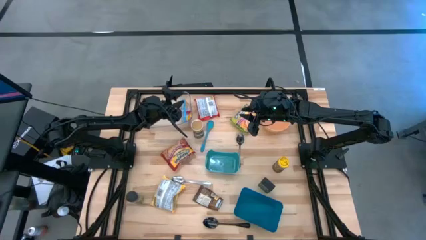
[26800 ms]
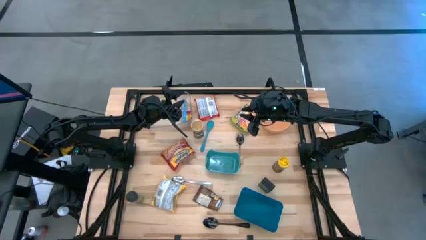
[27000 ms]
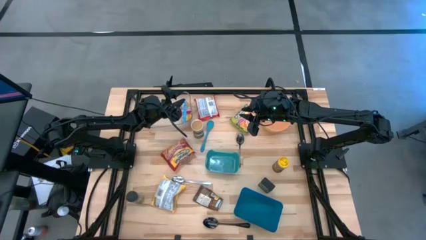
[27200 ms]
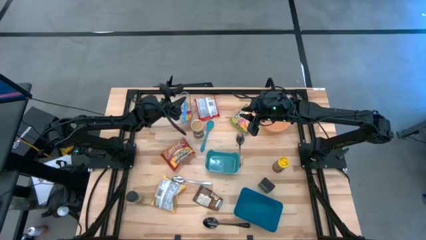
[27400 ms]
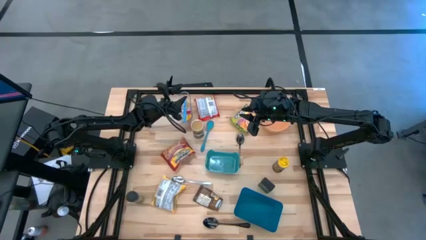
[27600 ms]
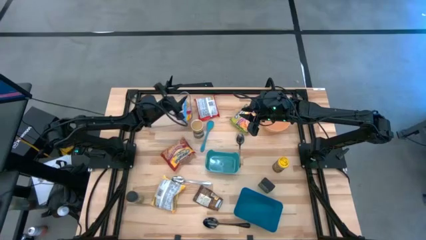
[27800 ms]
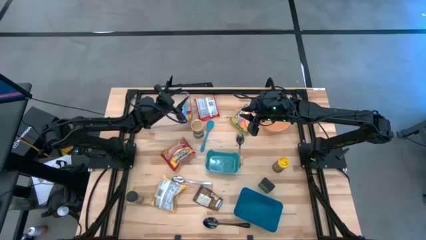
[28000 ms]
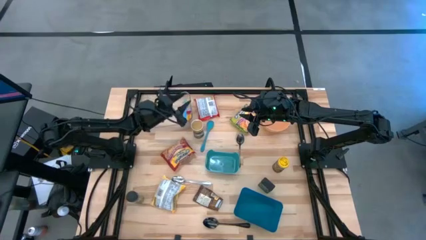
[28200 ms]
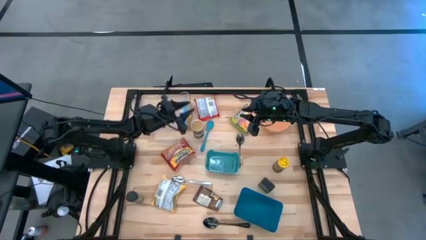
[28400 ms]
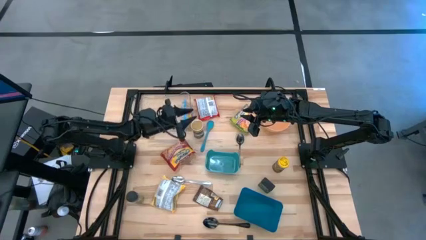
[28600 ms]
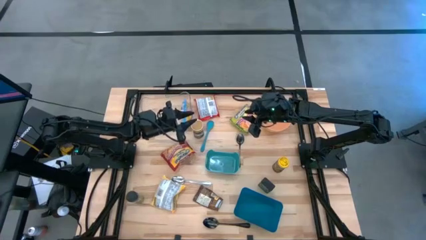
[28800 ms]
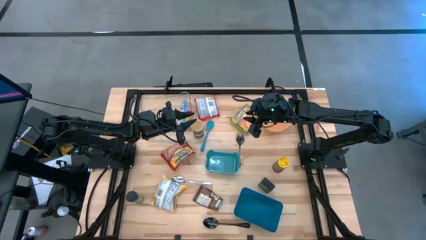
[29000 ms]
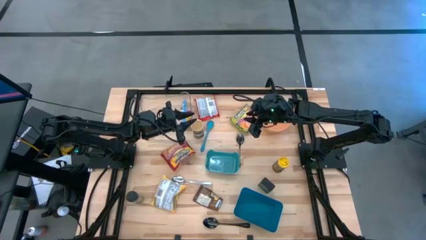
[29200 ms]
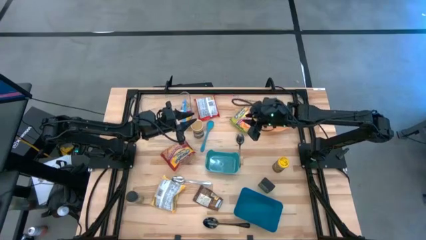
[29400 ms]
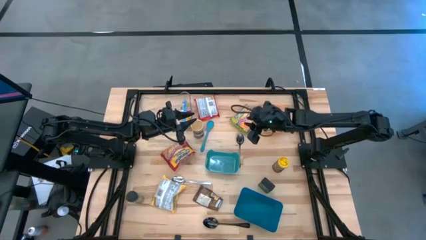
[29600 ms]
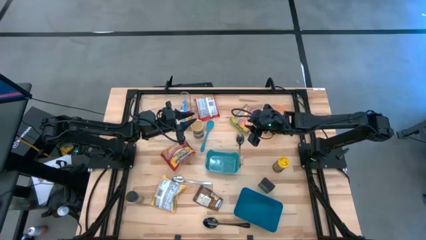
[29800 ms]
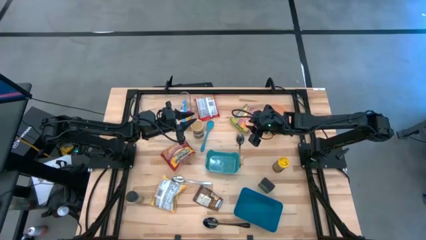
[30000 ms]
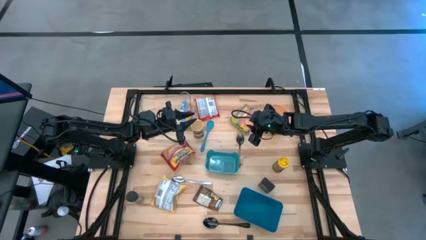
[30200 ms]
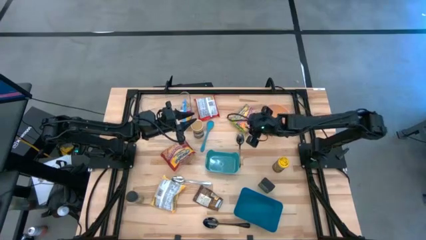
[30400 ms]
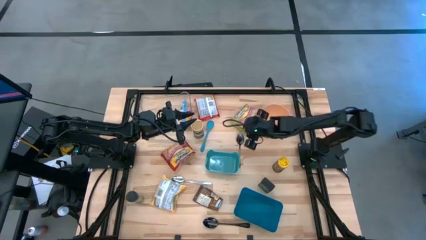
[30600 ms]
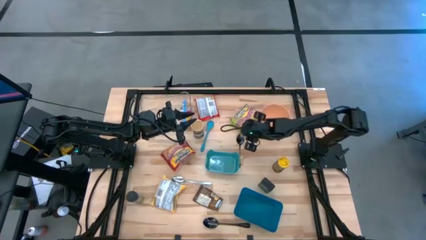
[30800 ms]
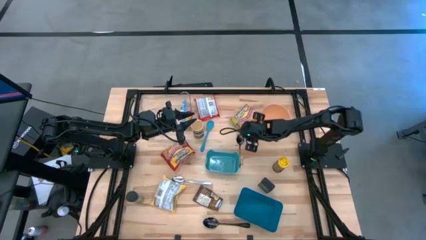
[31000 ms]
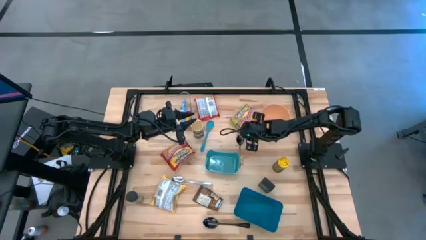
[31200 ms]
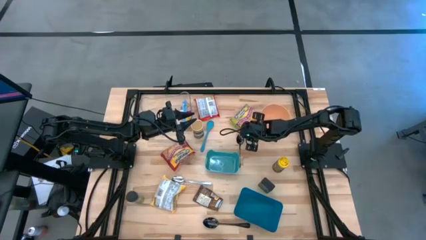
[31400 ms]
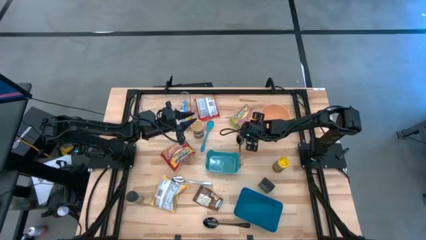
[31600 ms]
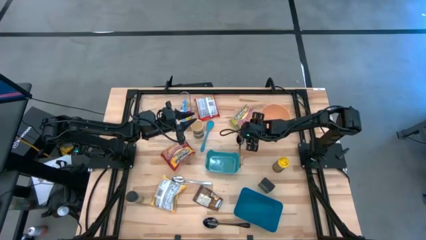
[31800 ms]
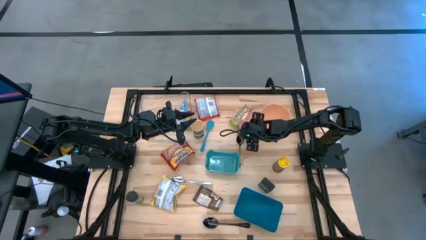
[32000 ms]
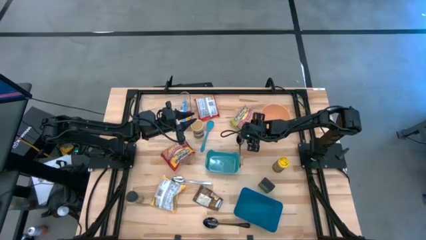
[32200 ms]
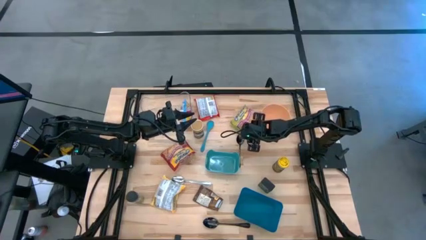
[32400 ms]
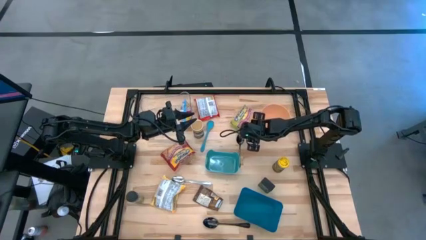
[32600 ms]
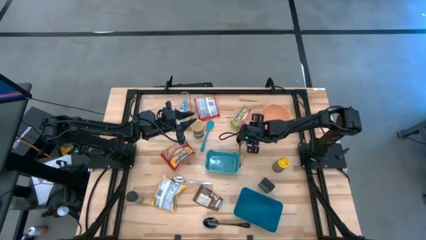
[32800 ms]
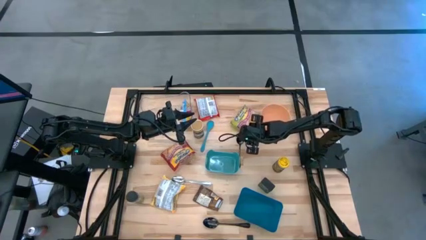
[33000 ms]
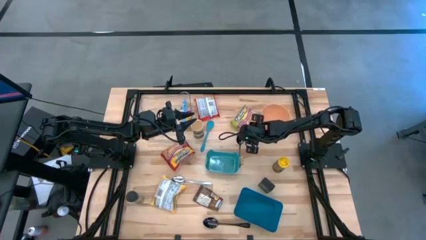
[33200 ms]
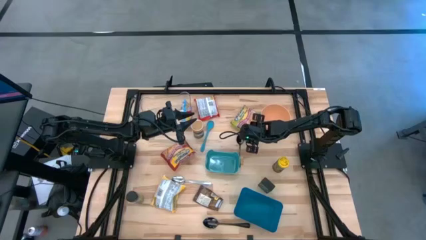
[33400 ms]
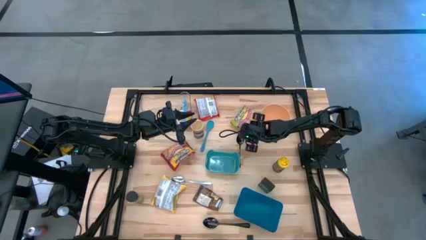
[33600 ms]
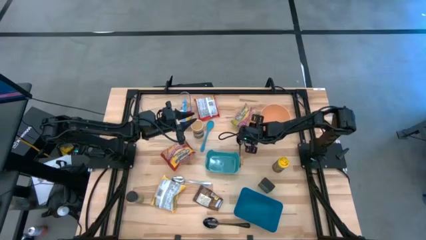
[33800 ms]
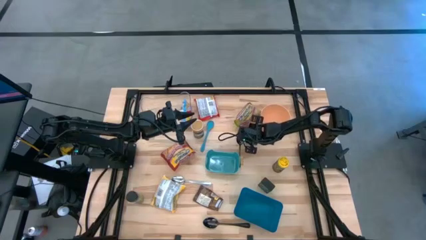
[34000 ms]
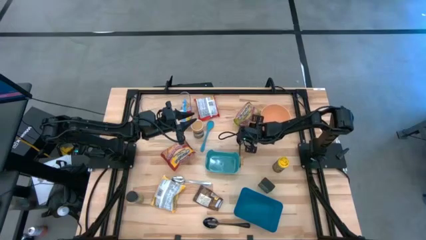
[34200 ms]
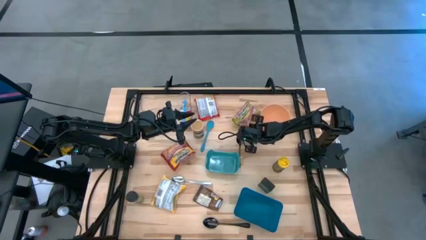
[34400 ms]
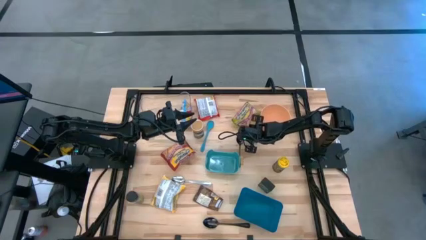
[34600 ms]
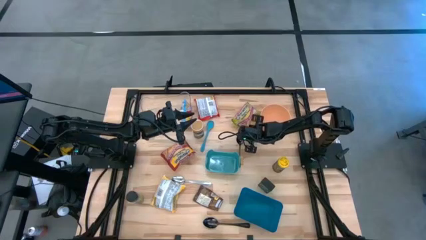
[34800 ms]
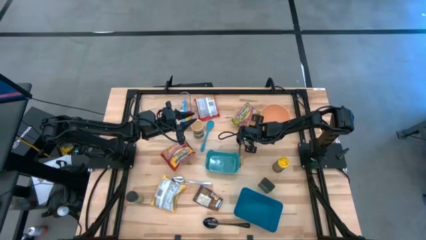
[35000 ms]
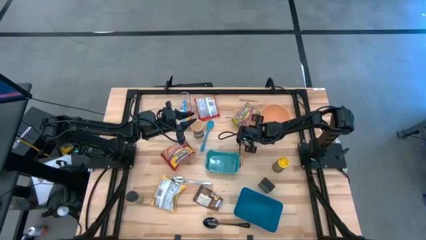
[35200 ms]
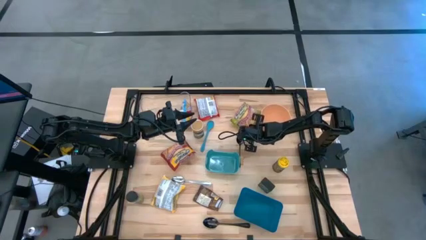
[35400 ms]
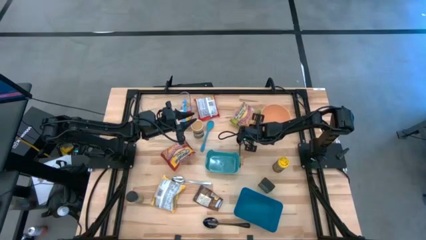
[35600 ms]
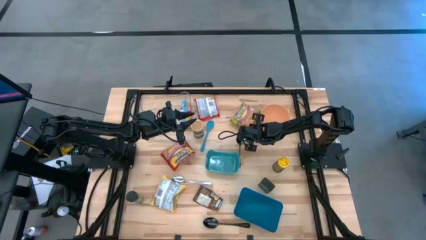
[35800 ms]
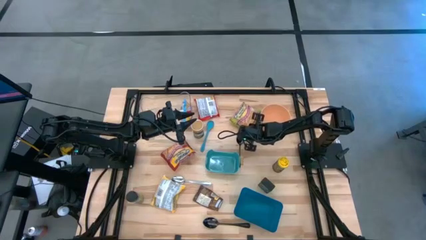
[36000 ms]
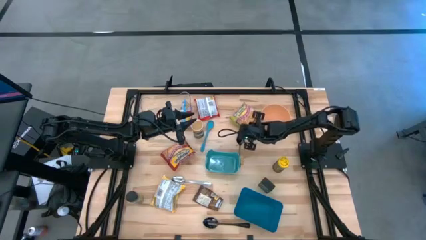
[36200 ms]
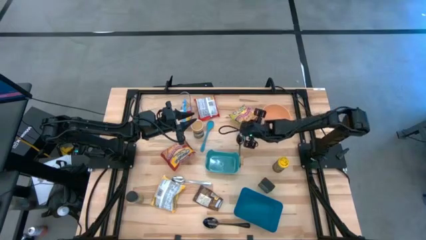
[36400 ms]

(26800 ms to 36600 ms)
Task: Pick & Place Food Item
Put the green noodle pack into the transparent bin

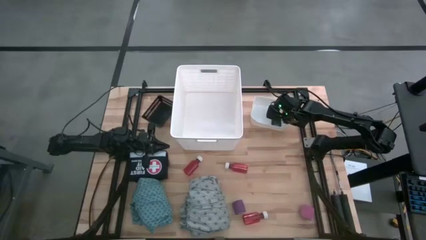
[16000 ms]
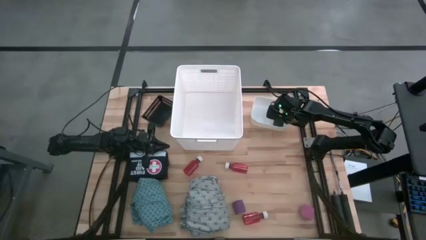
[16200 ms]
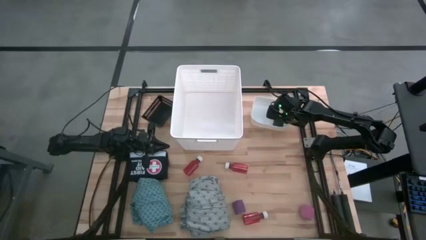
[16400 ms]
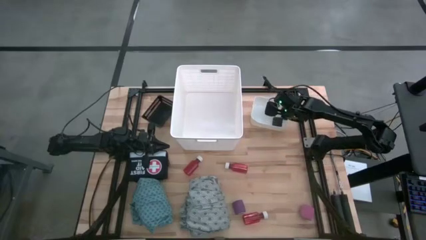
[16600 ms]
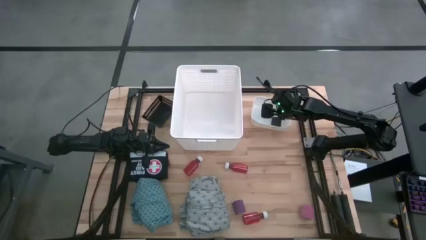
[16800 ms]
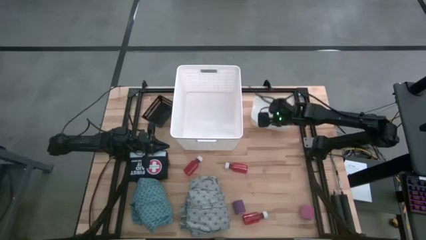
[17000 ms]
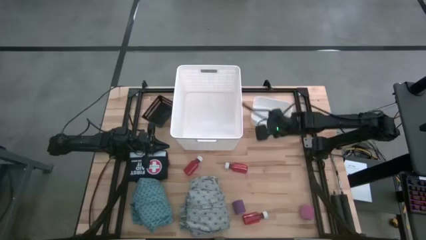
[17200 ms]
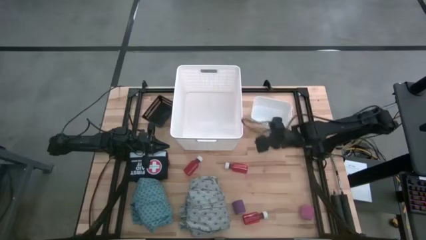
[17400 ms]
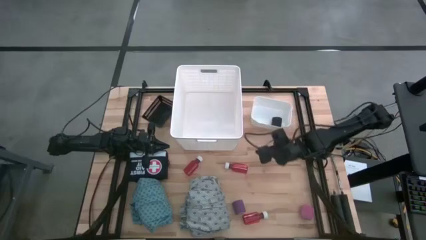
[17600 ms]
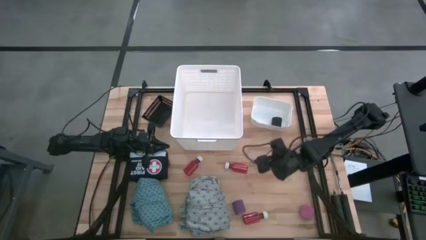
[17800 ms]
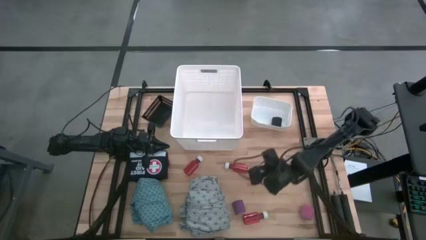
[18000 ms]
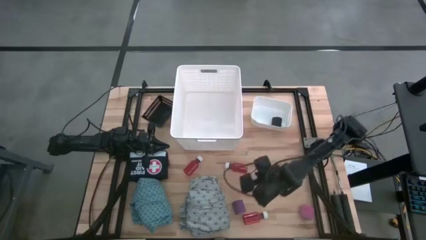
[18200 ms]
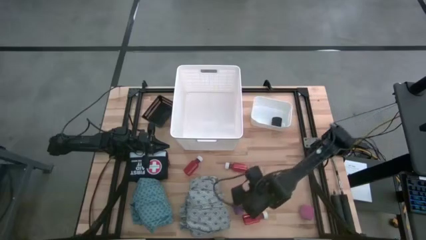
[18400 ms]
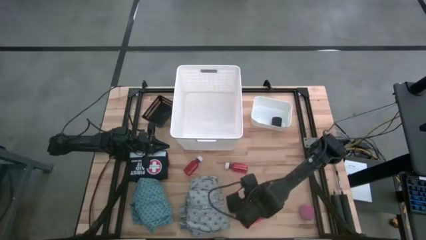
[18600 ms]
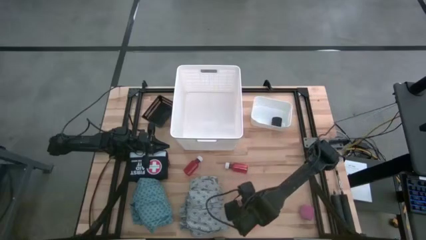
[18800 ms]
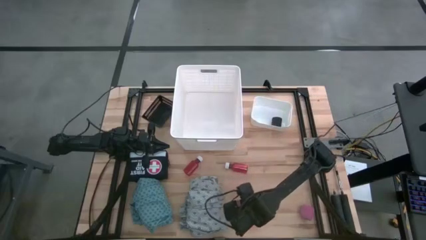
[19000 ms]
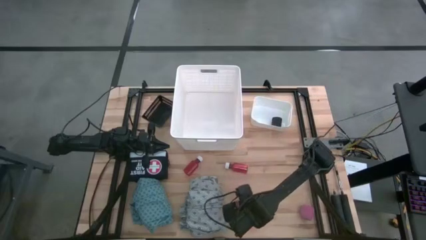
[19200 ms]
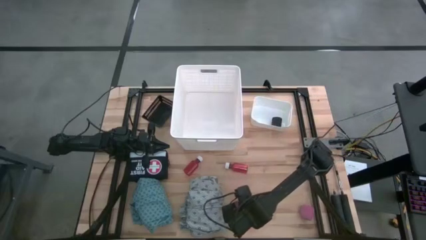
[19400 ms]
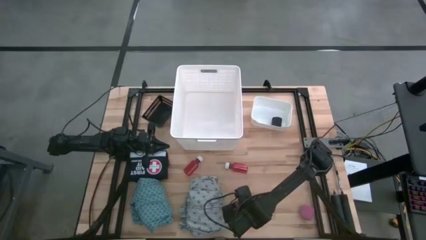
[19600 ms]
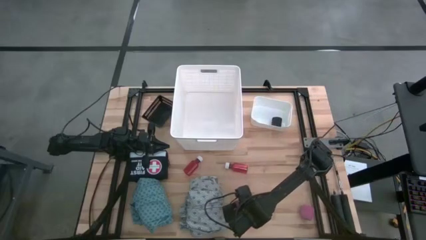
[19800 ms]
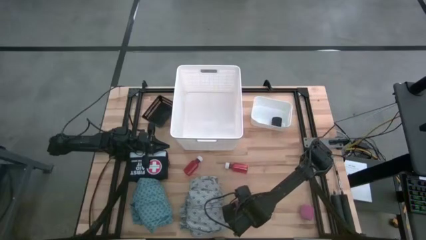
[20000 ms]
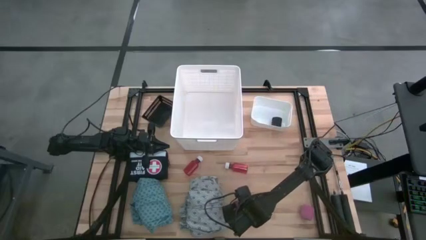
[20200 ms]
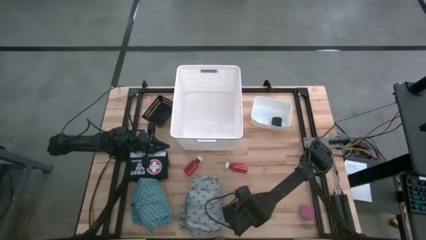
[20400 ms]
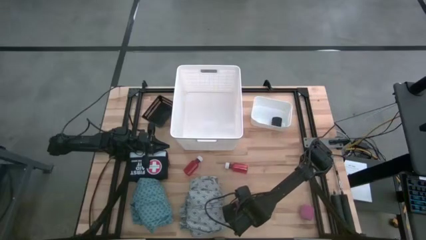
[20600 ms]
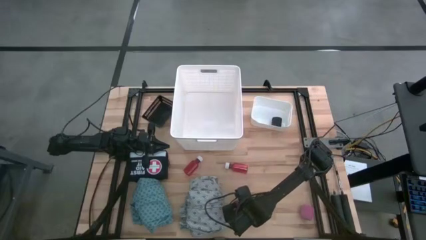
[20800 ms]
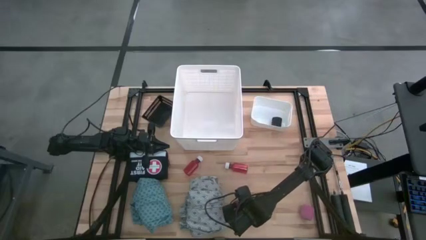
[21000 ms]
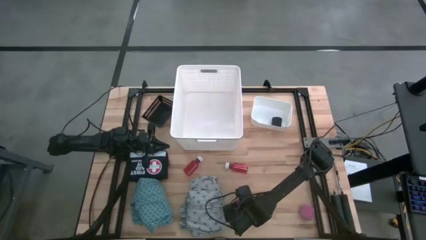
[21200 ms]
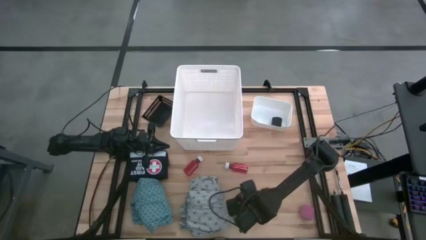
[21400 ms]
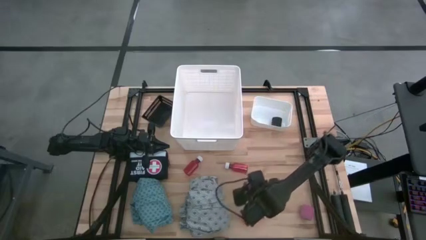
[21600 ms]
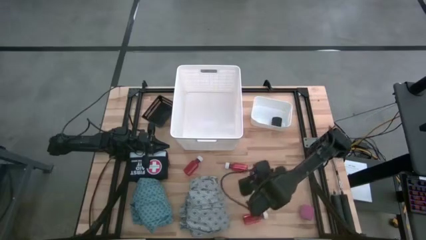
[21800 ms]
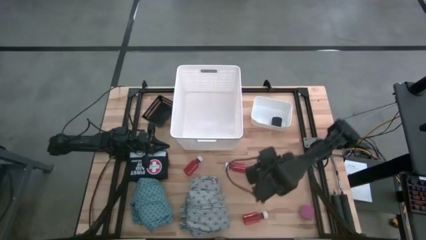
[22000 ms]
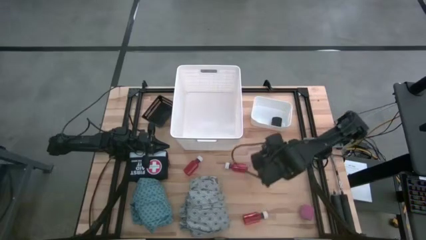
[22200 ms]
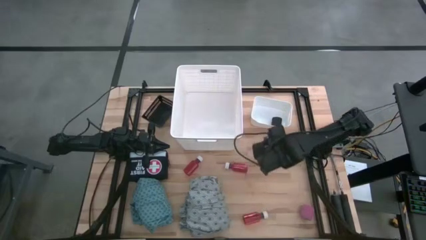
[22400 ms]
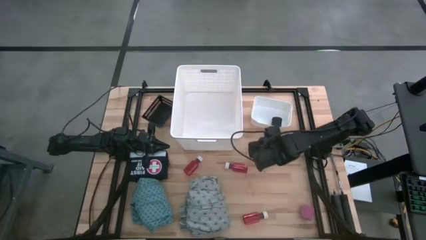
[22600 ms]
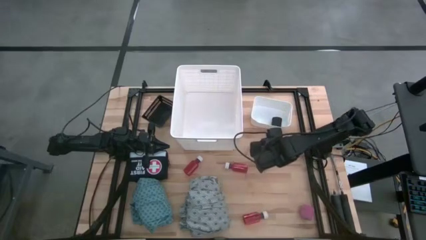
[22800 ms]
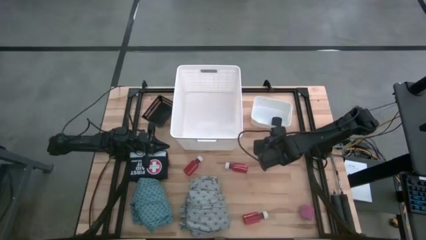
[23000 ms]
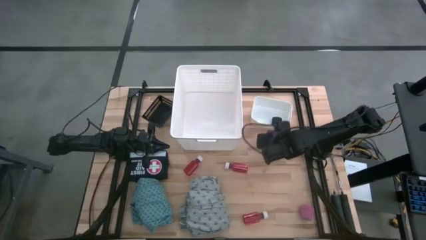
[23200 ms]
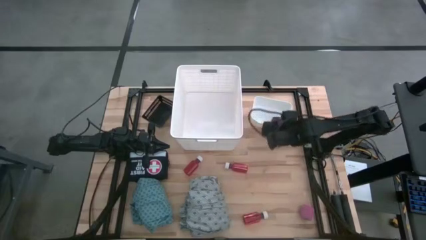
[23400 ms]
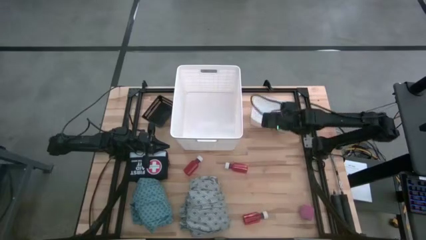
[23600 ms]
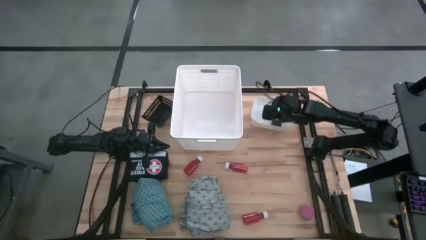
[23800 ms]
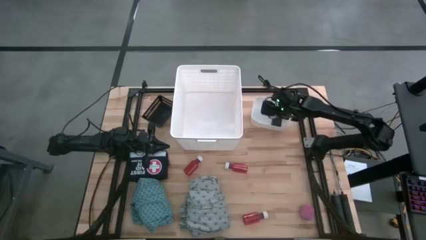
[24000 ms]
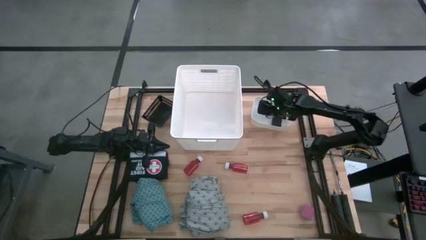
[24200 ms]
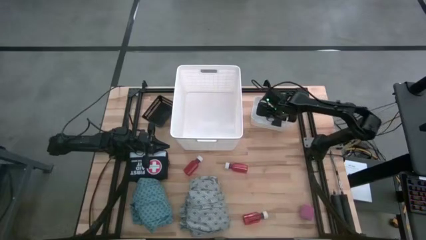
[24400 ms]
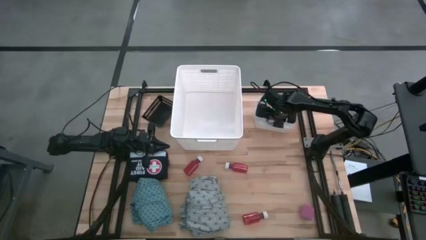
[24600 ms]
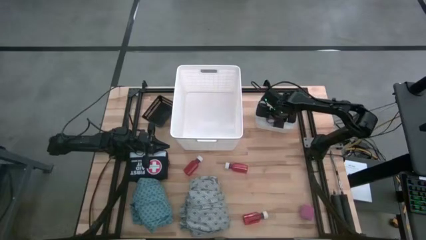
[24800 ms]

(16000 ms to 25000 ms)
Task: Pick & Place Medicine items
Put the violet bandage into the white bin
